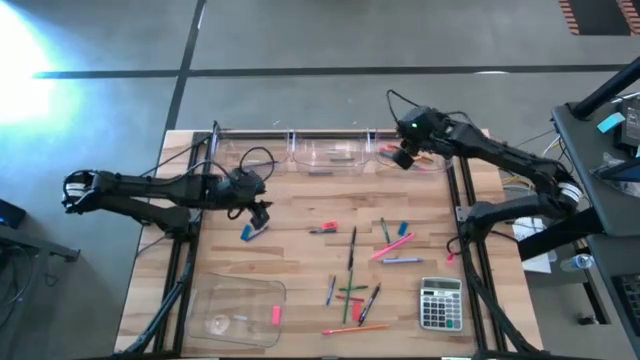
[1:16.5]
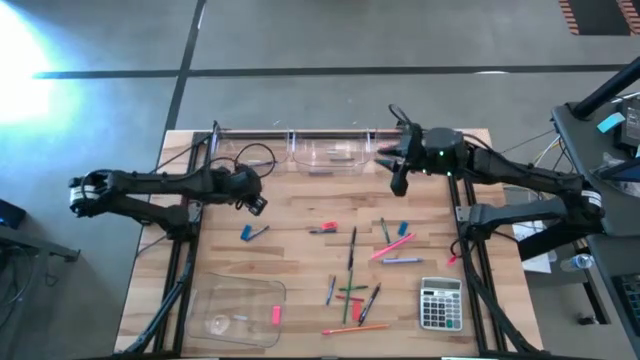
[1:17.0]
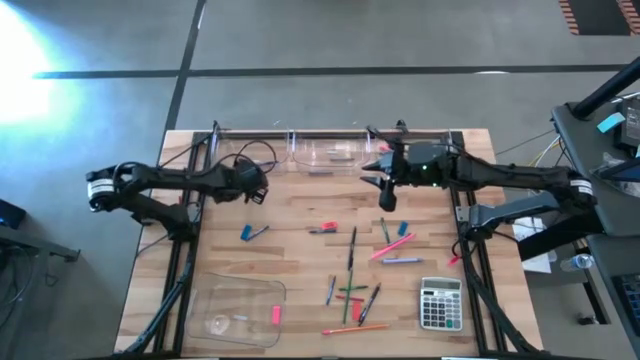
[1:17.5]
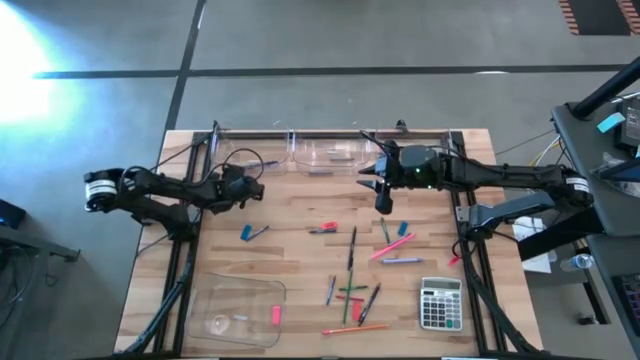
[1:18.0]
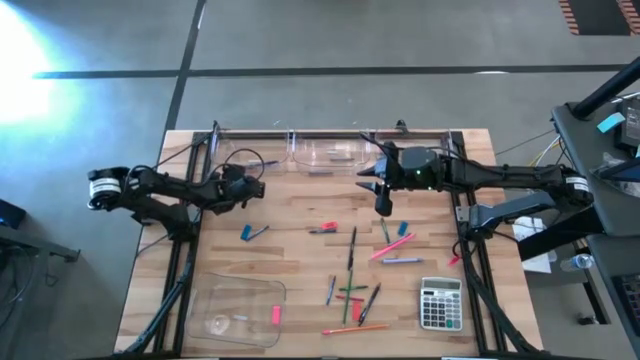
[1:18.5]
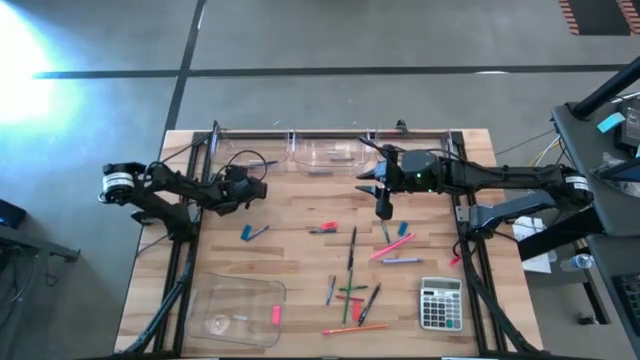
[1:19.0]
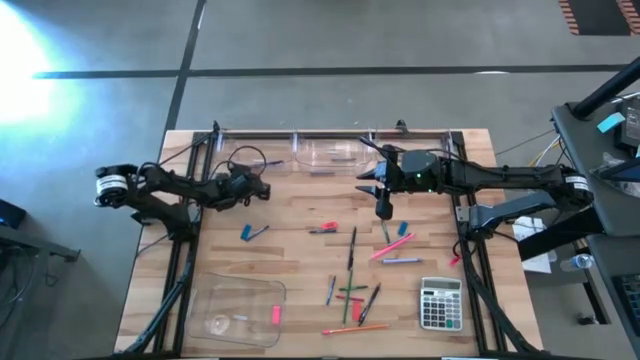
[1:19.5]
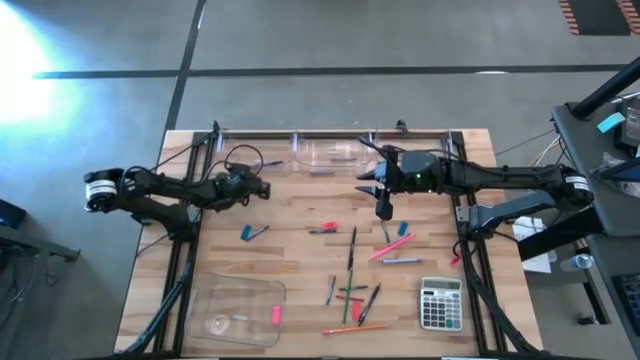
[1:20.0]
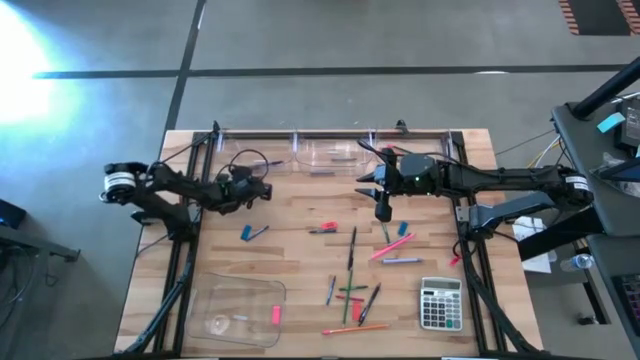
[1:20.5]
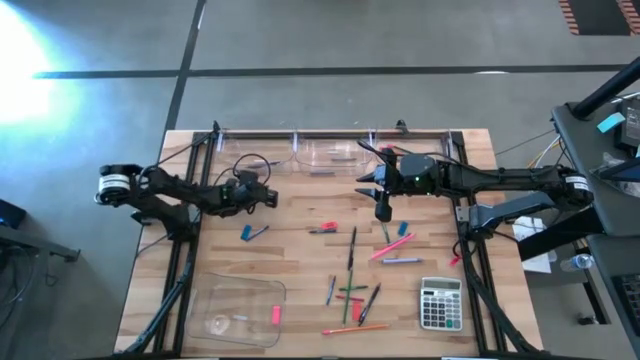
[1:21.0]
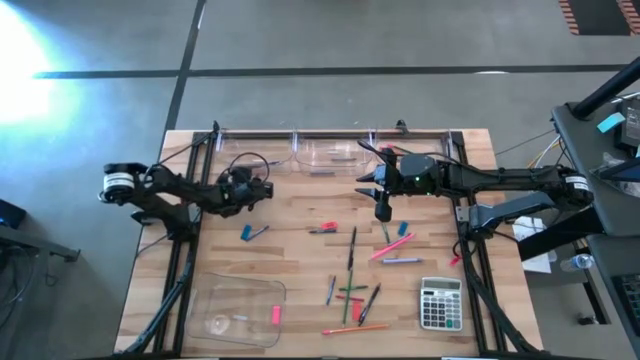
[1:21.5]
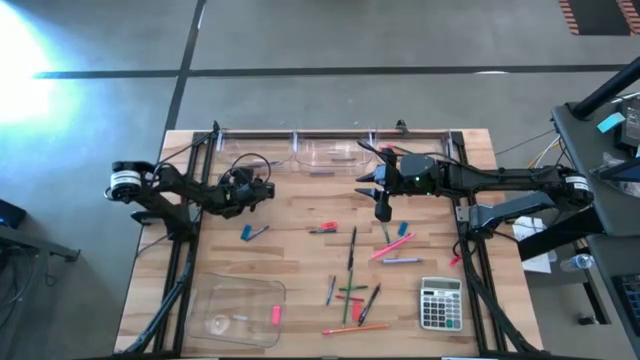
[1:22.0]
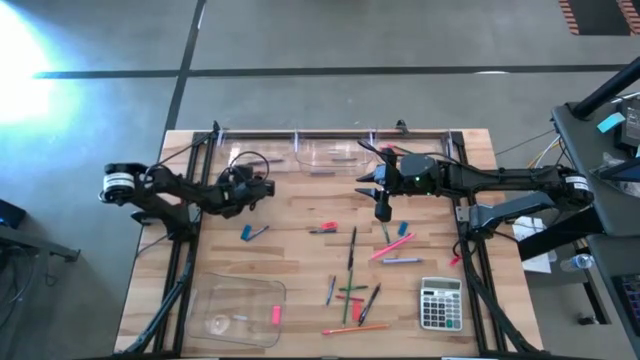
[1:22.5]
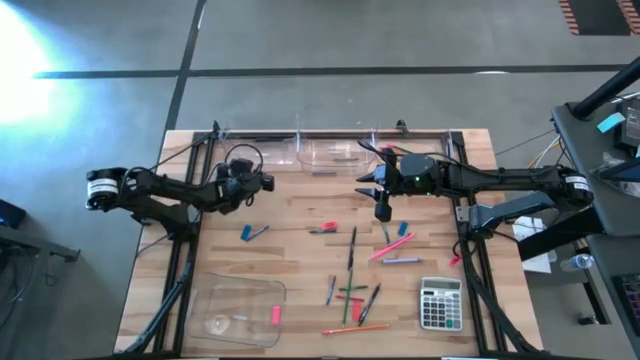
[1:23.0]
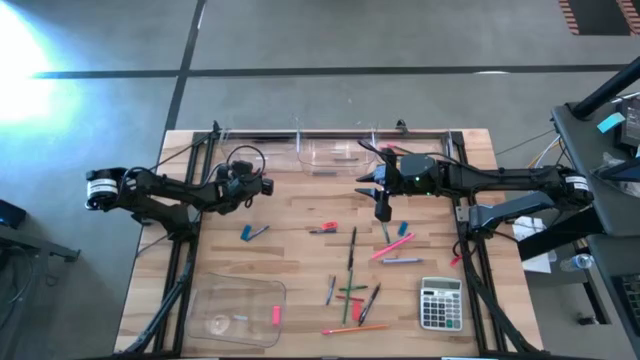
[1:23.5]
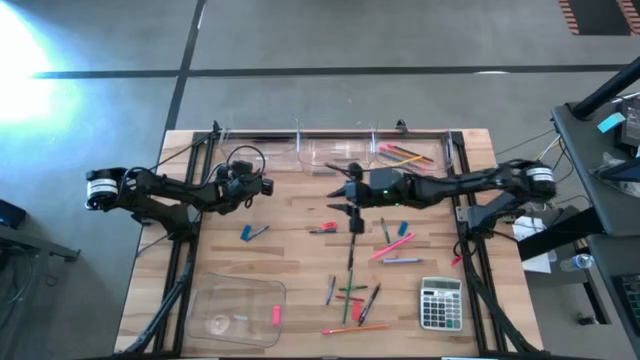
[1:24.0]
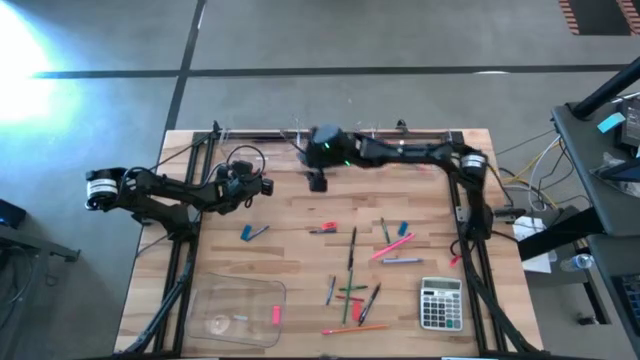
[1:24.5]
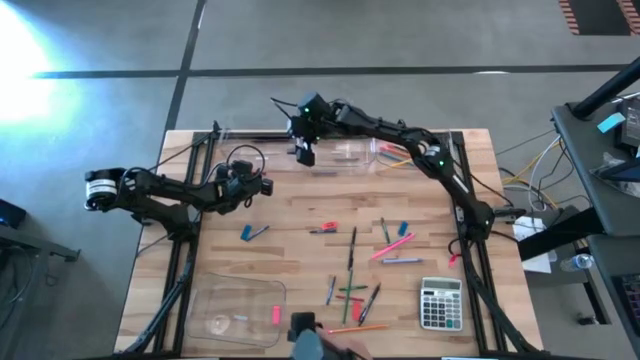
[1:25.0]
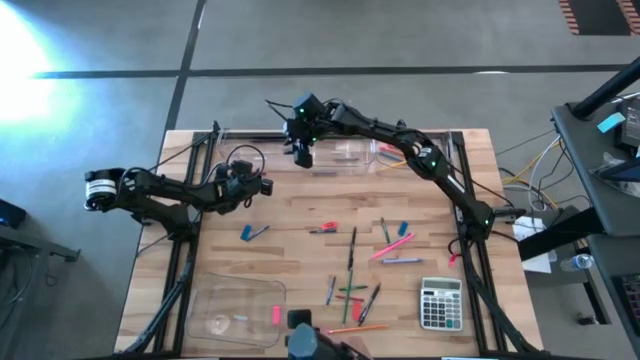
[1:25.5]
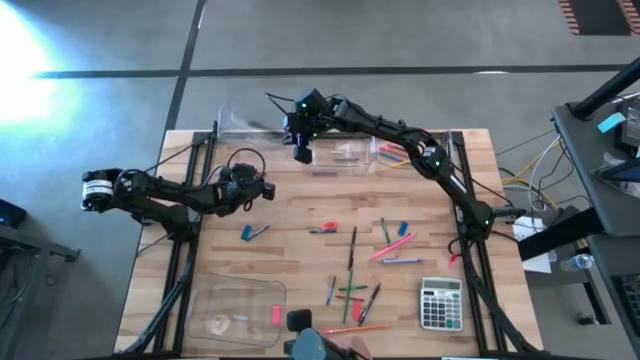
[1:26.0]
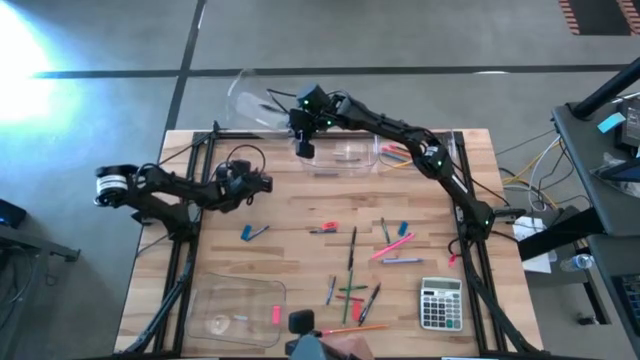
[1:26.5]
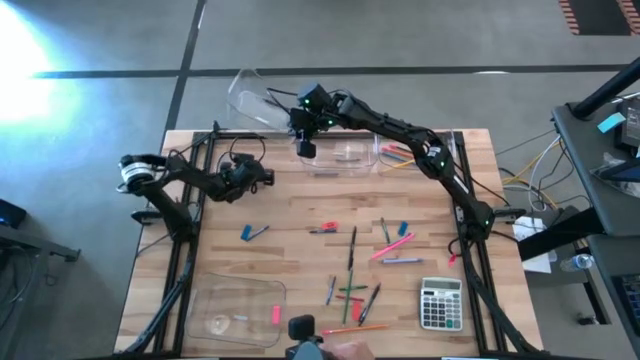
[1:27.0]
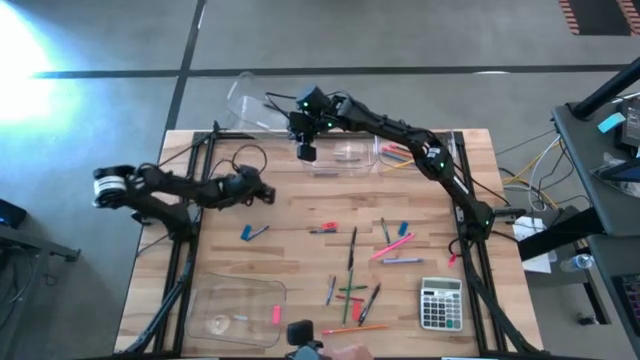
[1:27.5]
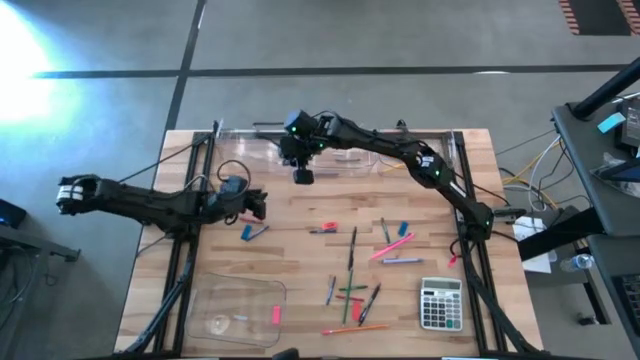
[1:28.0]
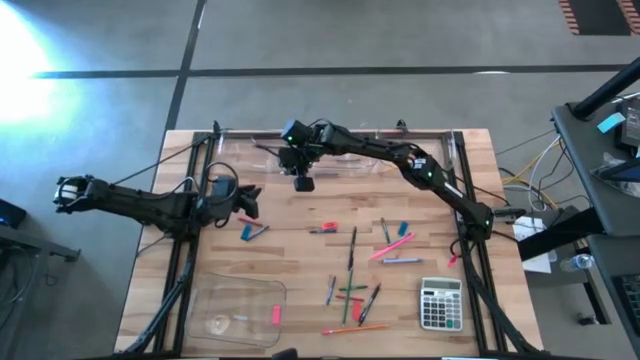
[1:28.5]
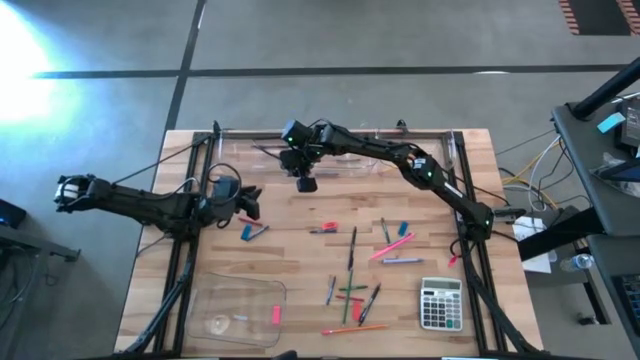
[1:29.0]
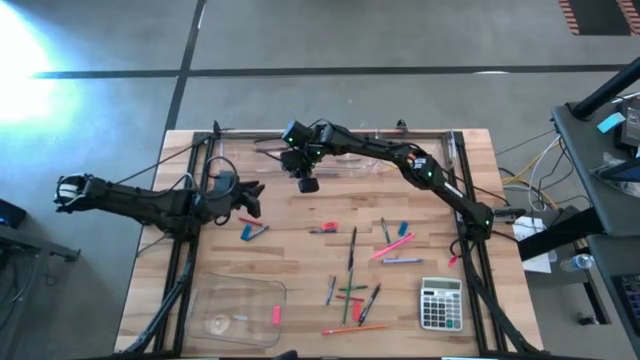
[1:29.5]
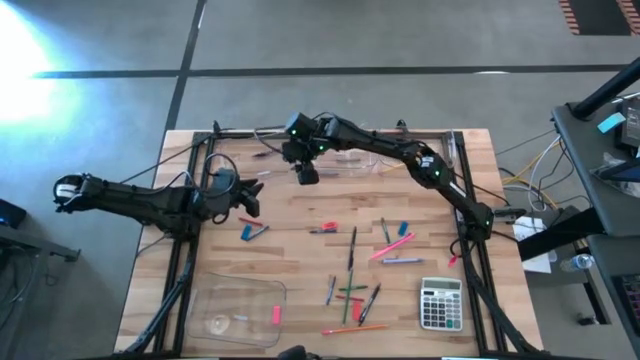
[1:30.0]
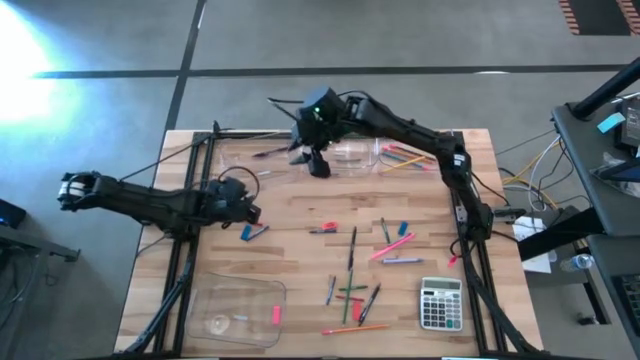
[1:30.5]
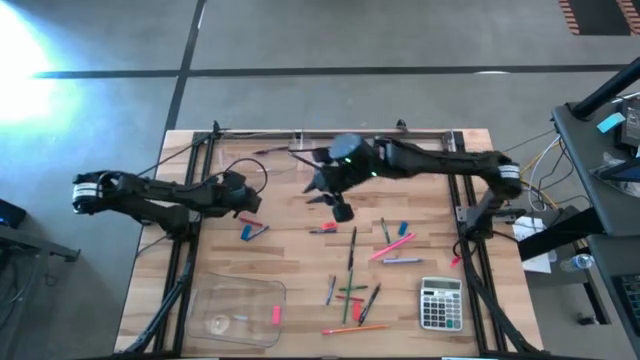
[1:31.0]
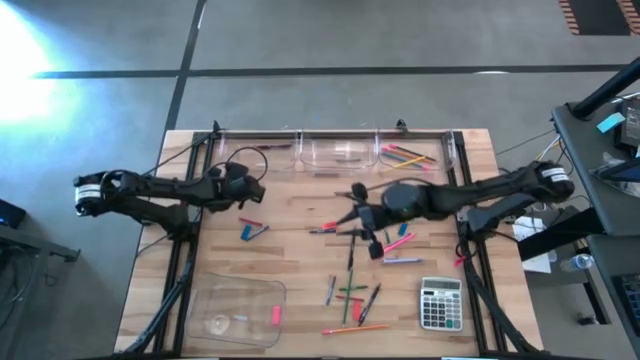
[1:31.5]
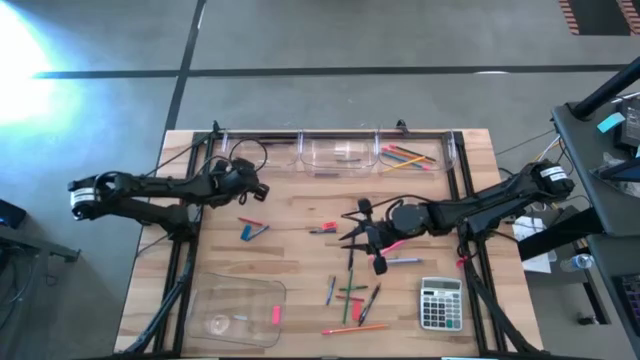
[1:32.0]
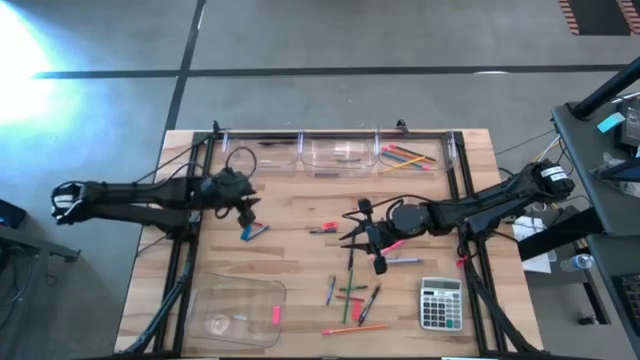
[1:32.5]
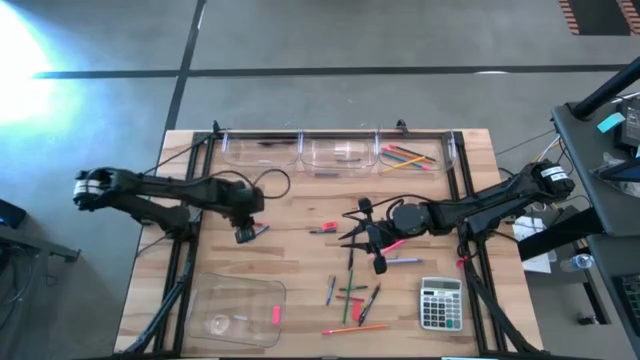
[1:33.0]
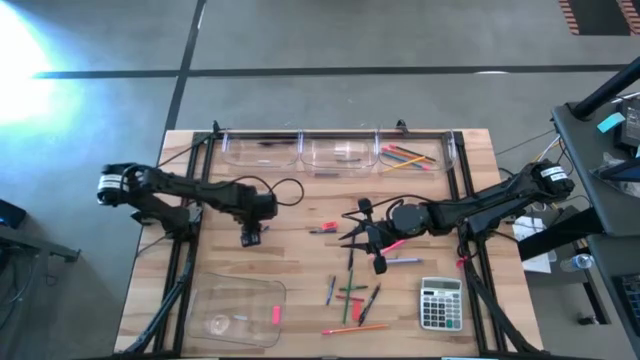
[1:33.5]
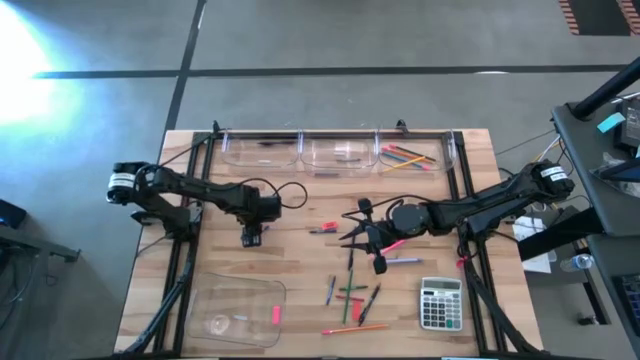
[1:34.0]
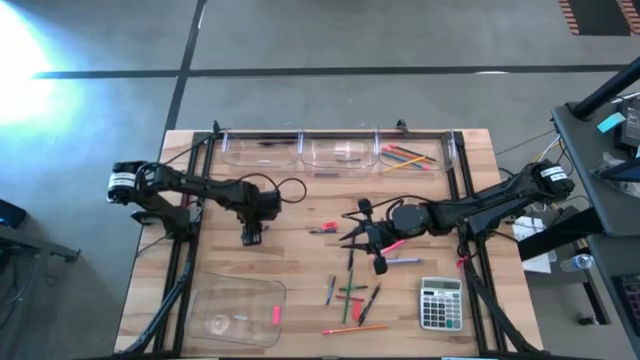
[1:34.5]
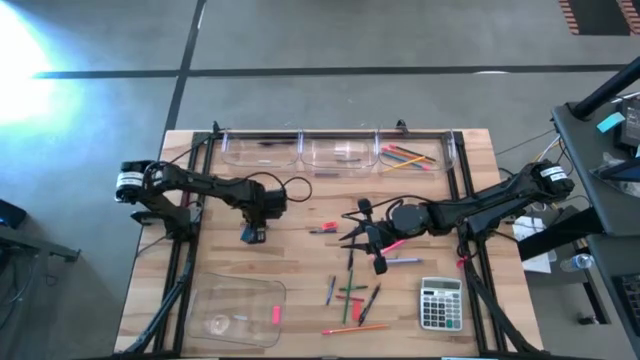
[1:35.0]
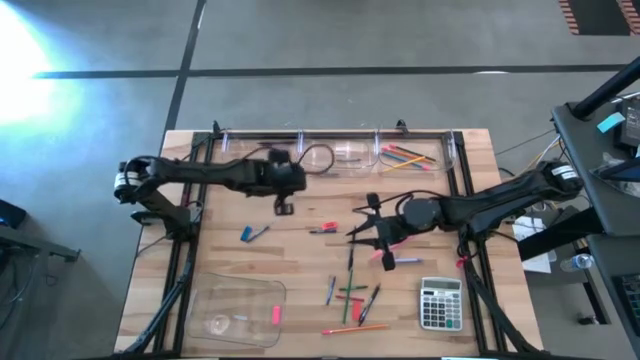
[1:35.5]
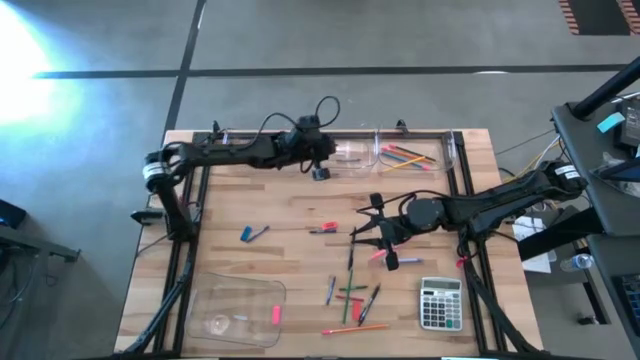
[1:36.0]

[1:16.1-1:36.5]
Task: Sort crayons/erasers/pens/pencils in bins
Put the red crayon into the top middle transparent bin

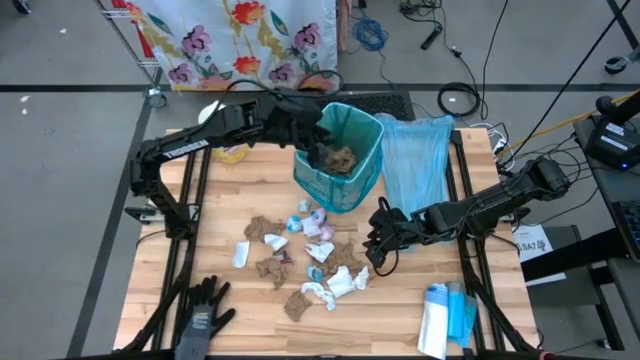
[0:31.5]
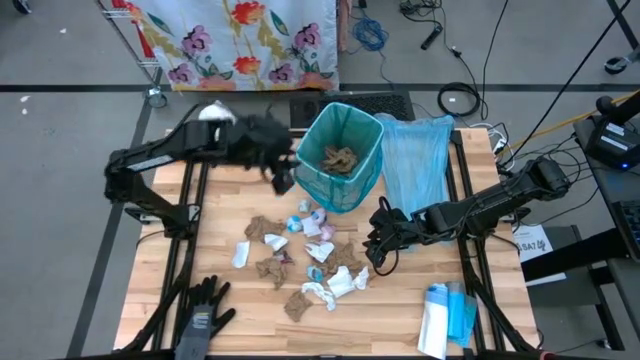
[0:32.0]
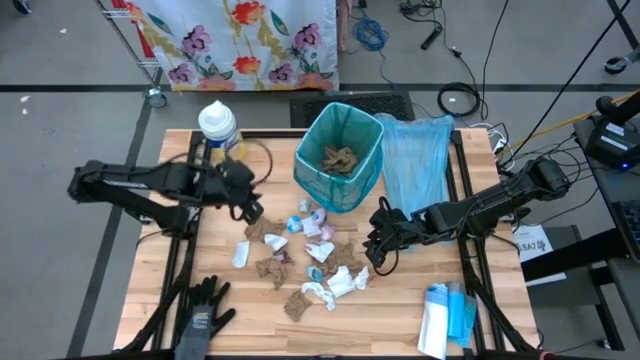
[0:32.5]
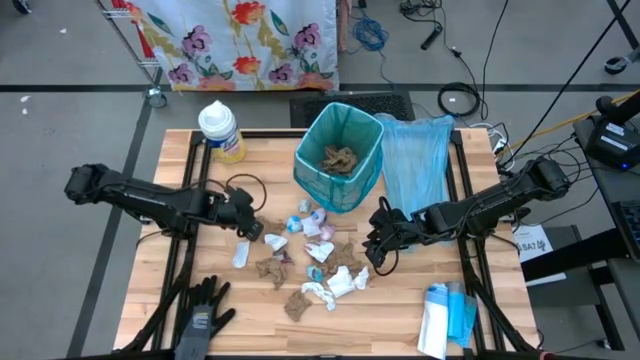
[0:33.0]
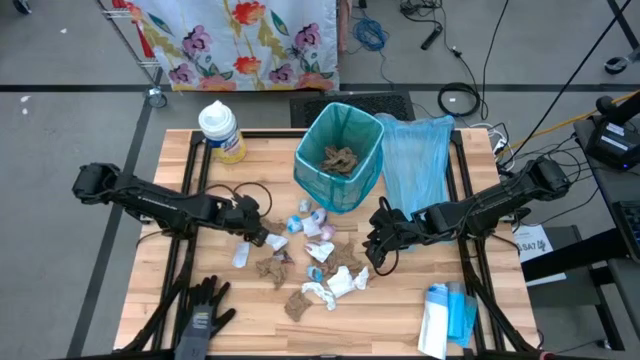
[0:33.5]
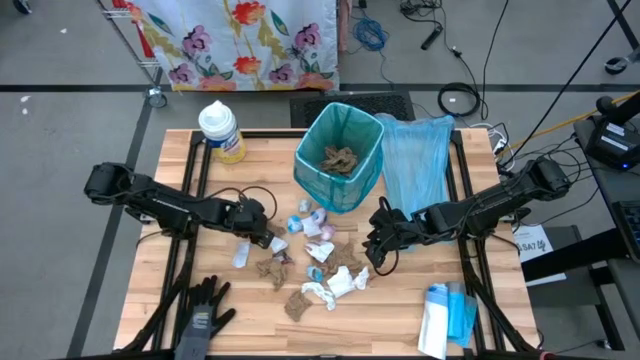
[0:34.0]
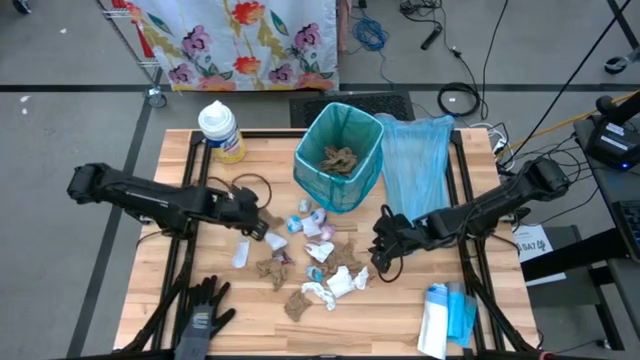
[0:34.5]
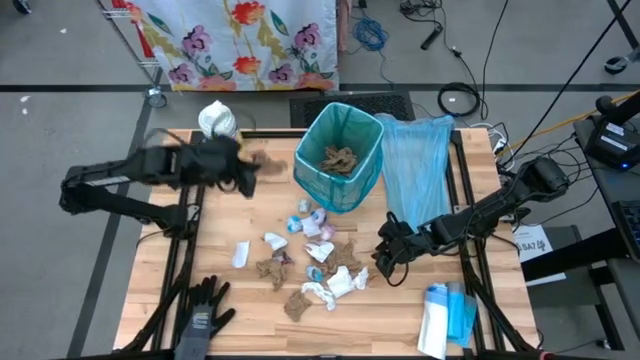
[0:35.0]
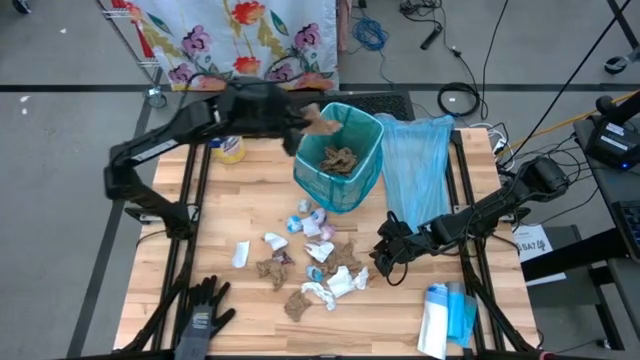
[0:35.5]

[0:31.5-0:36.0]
Task: place trash/remove bag and relplace
Put the brown napkin into the trash bin
